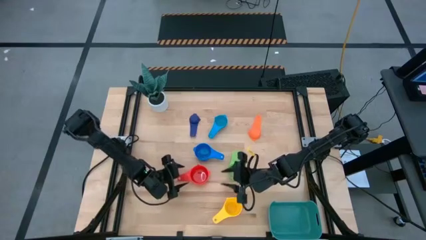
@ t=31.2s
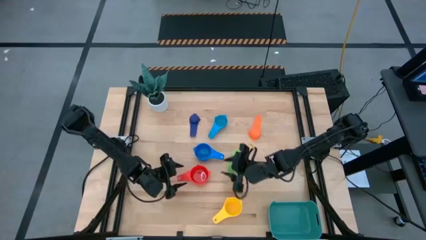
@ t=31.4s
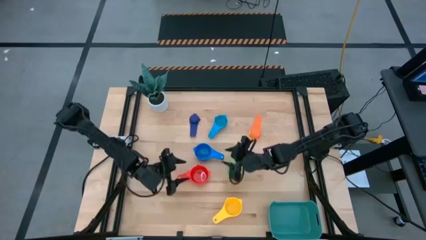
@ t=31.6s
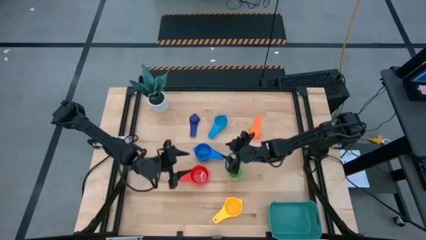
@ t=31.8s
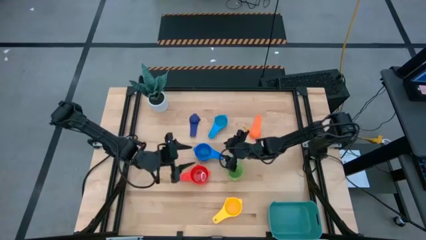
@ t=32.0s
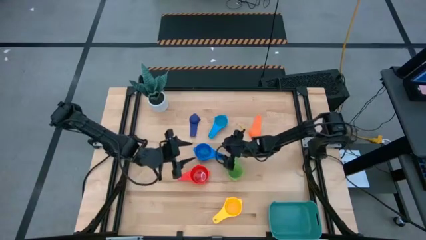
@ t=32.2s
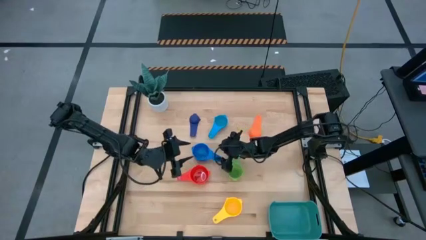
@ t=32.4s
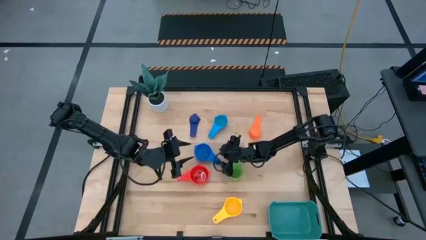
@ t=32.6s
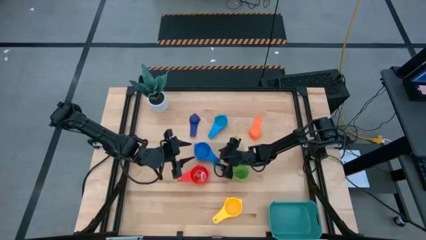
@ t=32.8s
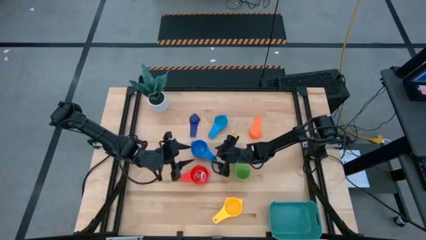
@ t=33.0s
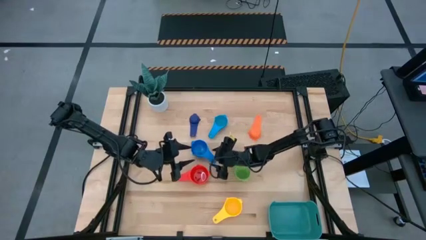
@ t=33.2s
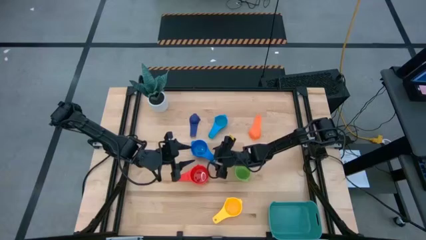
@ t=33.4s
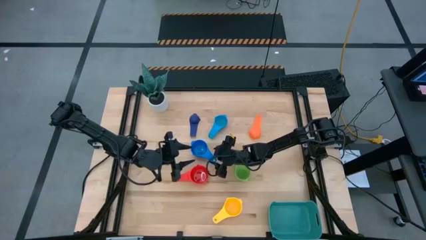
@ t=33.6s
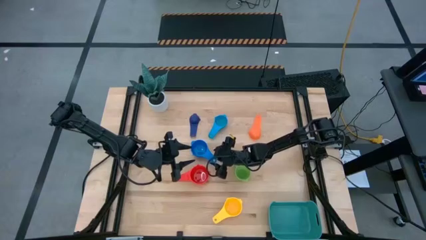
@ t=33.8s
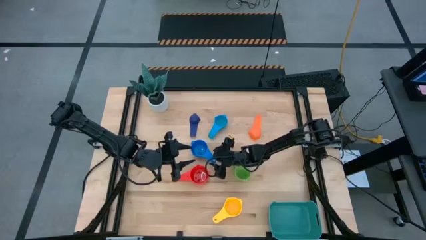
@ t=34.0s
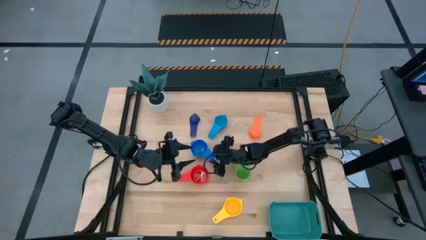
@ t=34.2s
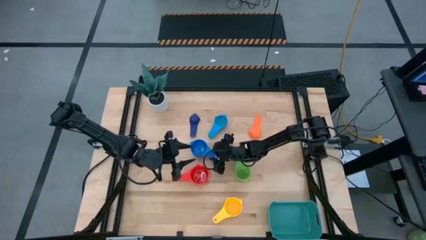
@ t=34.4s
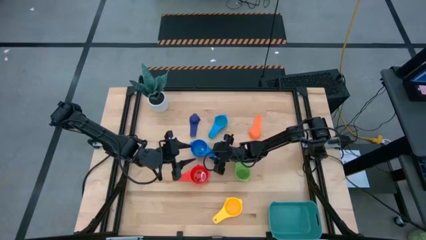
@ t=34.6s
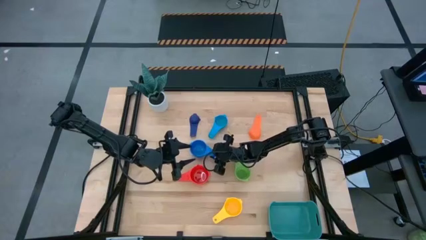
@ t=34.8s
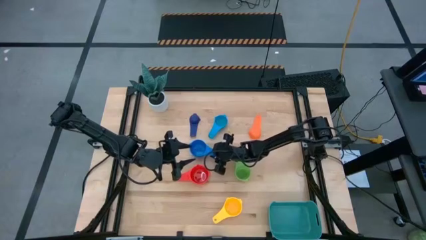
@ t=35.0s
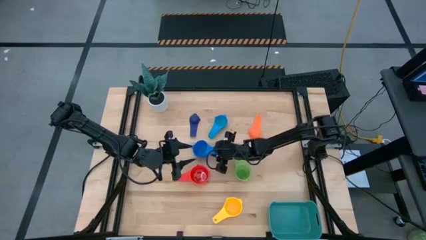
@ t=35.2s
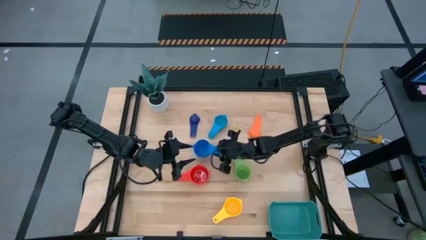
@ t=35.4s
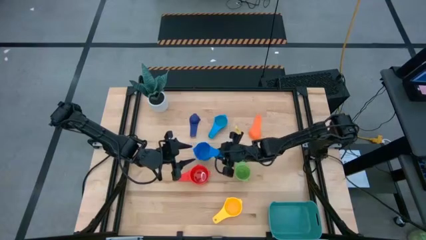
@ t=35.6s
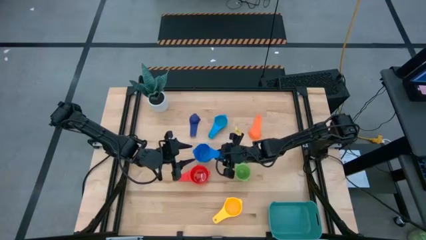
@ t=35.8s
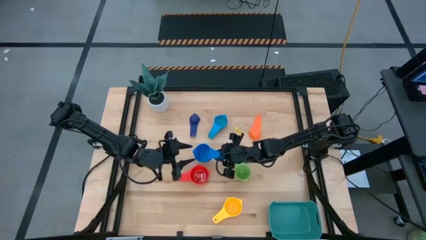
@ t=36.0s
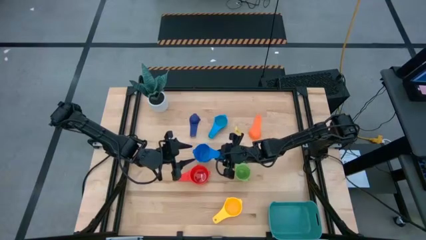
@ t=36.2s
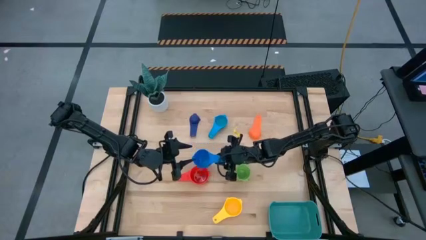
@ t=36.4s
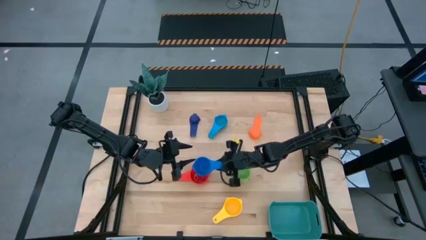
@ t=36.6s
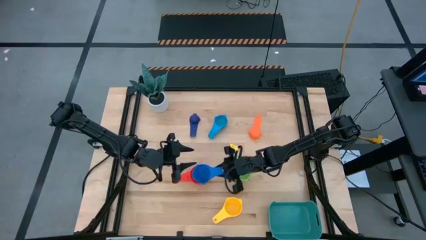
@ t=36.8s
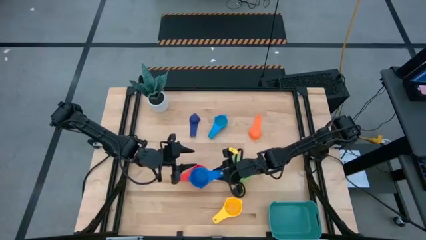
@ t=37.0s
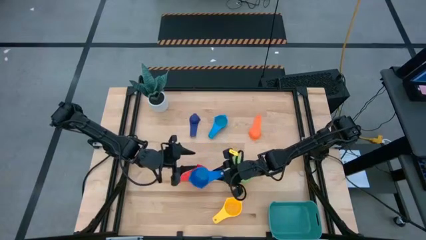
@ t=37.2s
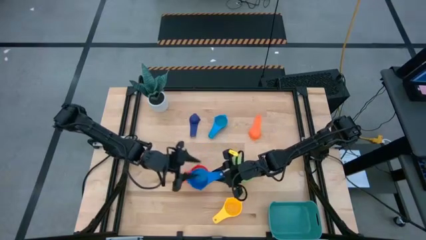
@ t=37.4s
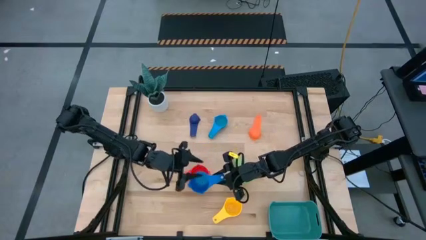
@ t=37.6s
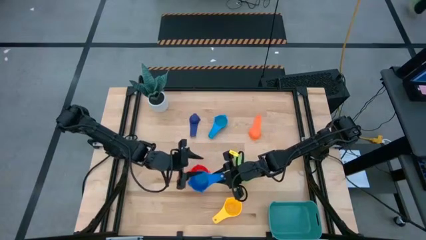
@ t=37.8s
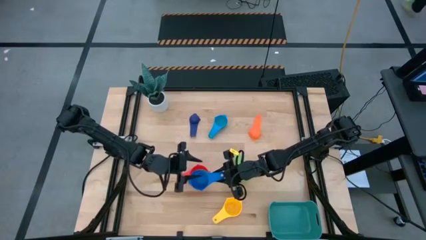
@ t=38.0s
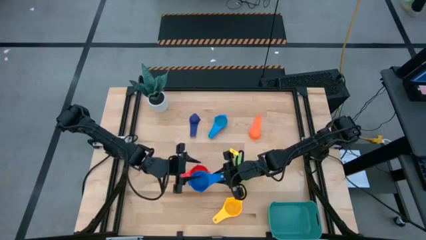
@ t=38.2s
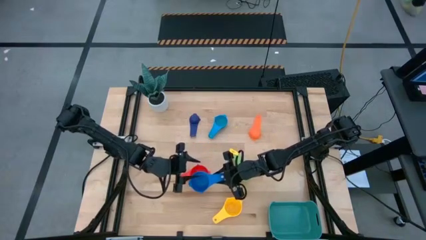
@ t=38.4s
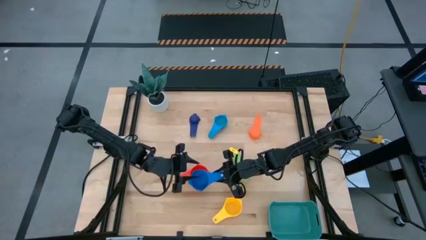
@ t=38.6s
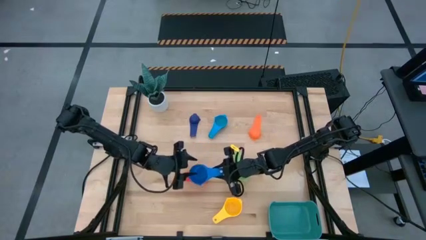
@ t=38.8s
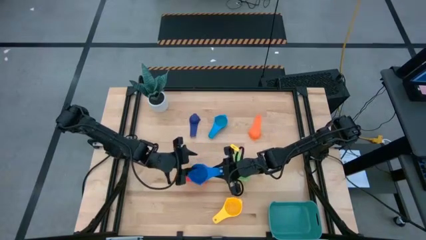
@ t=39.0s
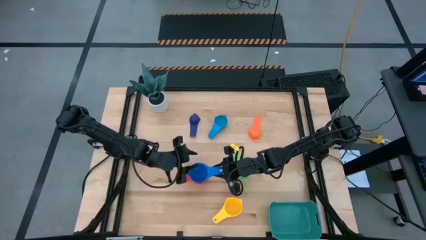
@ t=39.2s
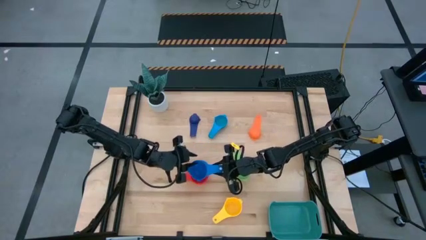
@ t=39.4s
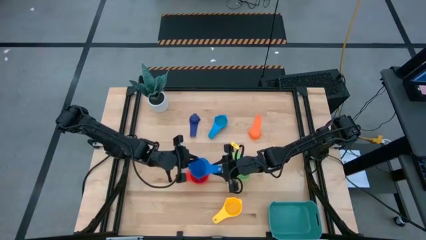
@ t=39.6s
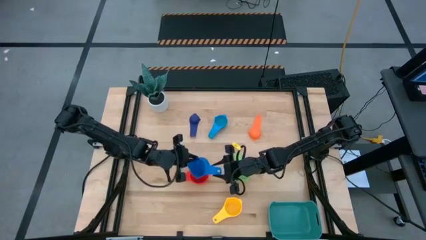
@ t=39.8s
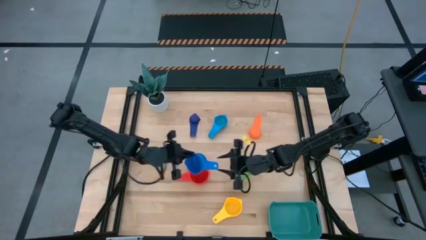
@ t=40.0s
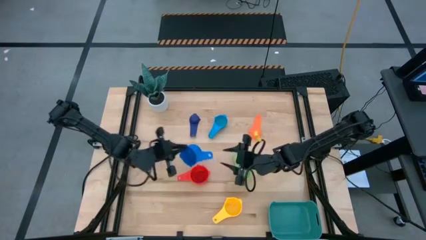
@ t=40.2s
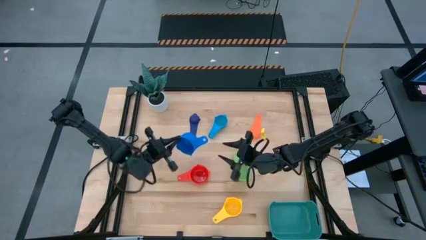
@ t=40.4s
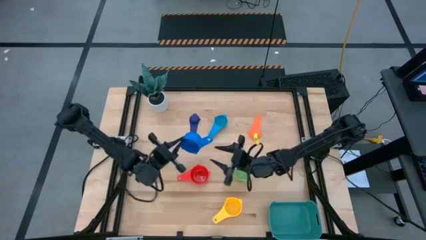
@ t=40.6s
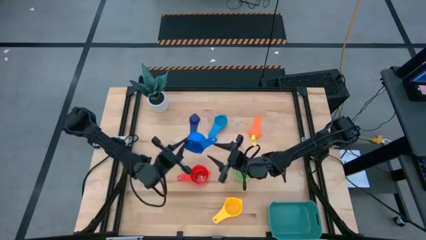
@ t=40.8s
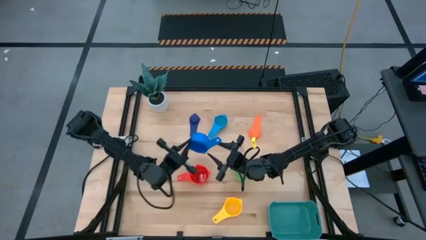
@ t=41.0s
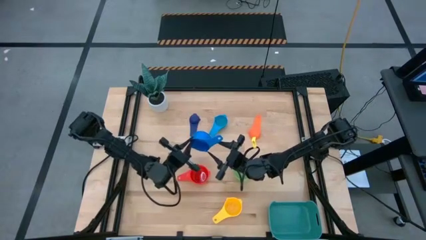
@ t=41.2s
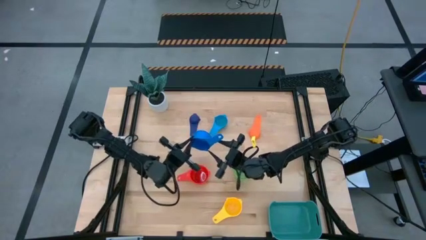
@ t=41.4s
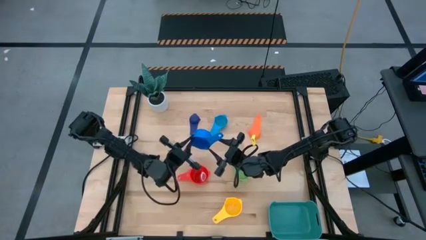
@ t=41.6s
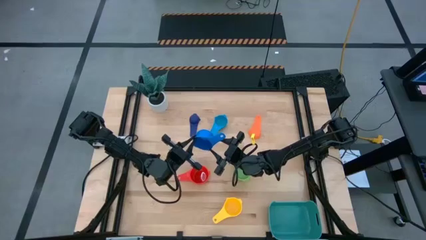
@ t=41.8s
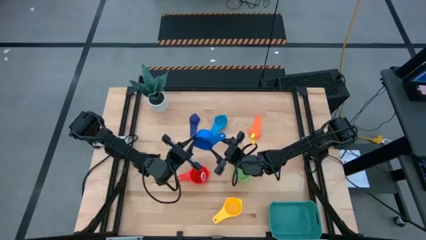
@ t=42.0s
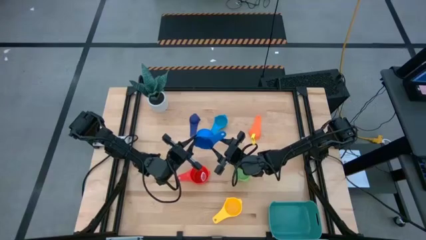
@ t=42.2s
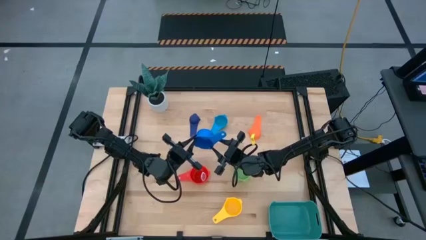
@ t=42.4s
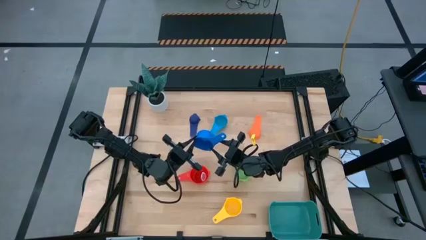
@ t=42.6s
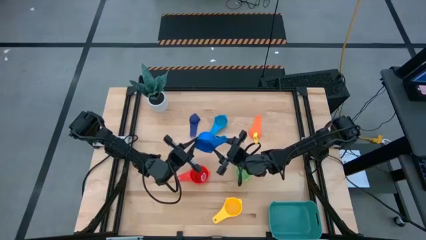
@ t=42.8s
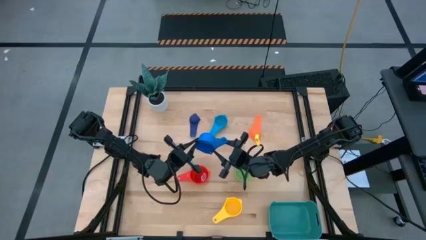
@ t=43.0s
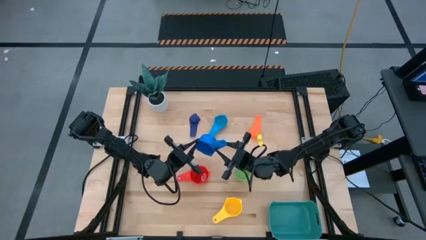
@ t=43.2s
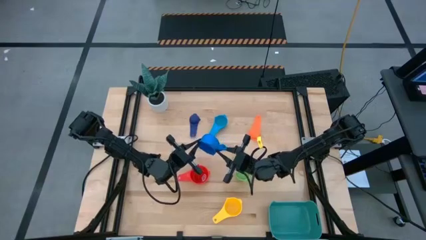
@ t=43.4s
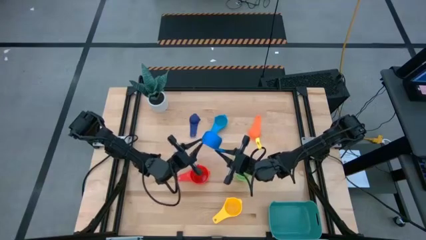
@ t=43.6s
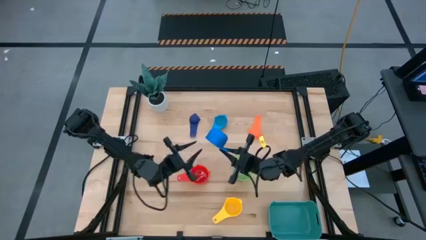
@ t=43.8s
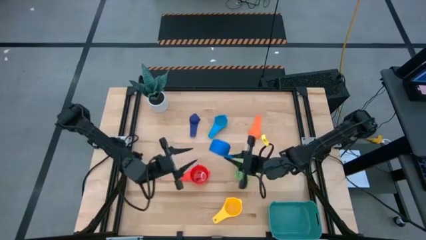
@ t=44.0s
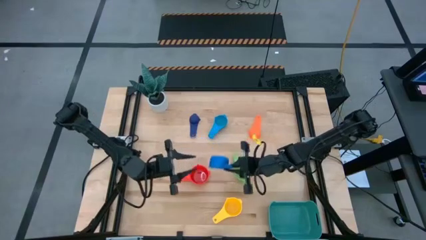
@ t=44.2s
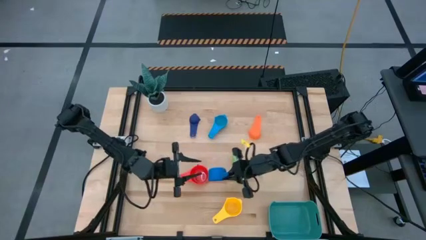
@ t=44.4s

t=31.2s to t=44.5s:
Task: Nest measuring cups in basket
Stack the blue measuring cup on top of the red measuring cup

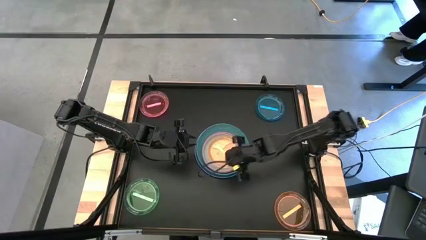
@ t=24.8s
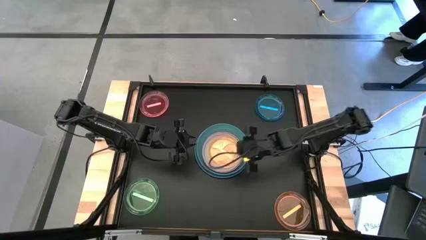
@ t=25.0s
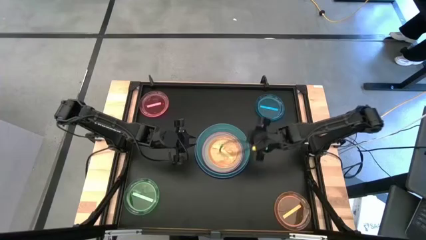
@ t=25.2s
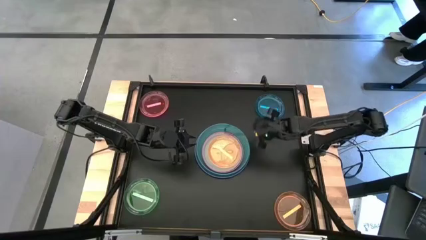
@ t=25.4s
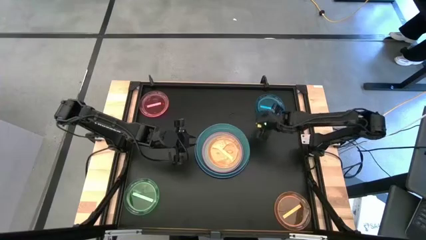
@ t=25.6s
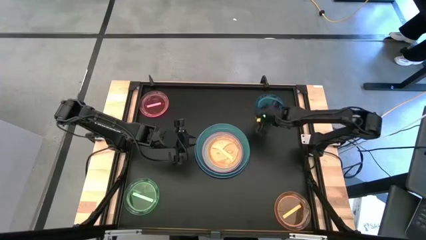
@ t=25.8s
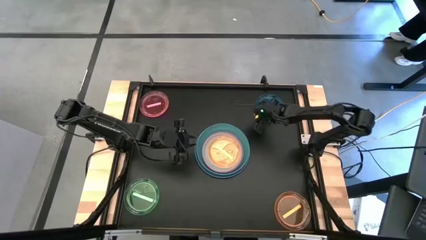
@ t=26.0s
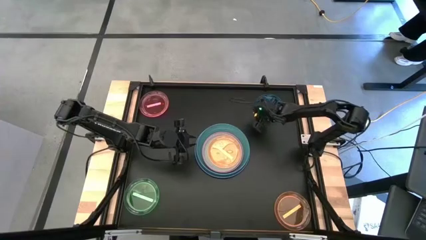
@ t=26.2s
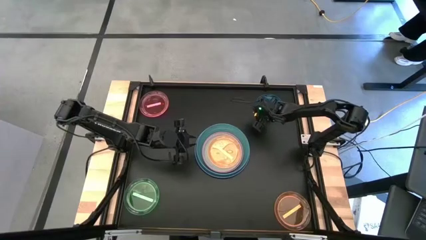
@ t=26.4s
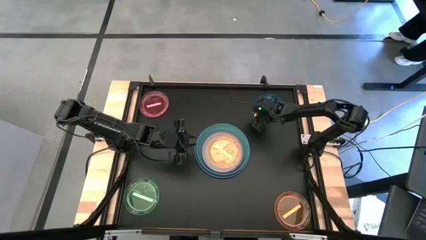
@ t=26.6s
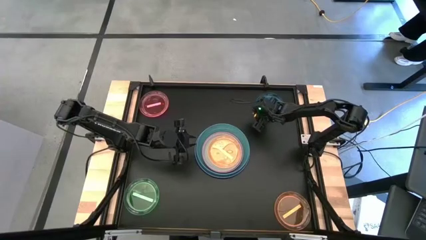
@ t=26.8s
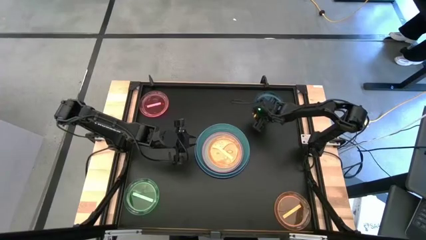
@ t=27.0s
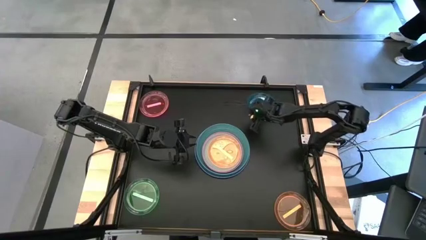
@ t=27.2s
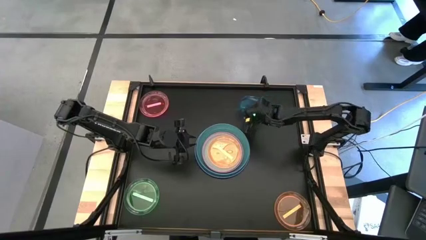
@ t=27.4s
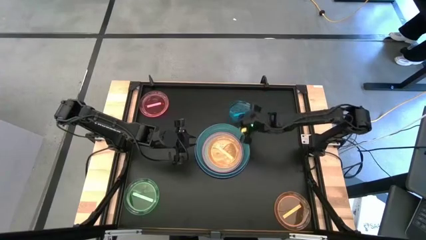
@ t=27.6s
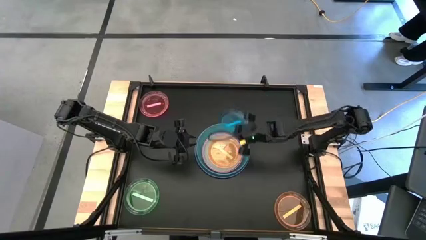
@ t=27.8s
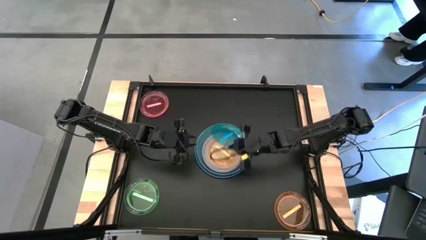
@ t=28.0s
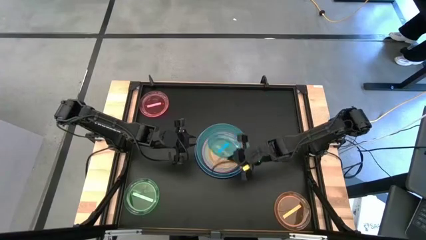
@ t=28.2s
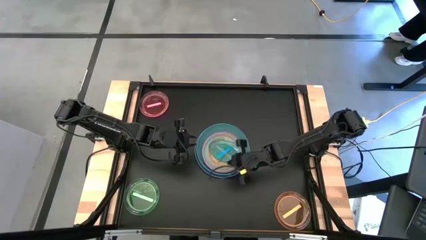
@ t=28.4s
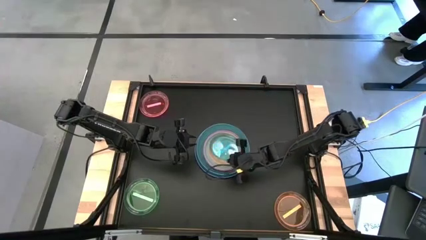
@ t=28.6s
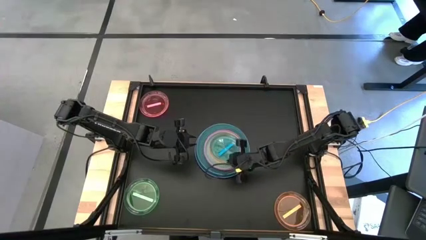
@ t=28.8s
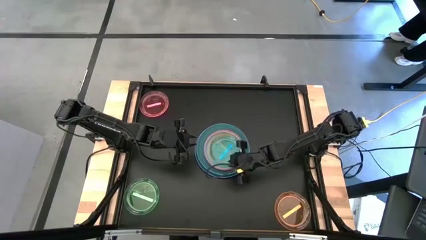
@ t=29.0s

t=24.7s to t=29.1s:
Task: Stack plastic plates
Stack the blue plate on top of the orange plate
